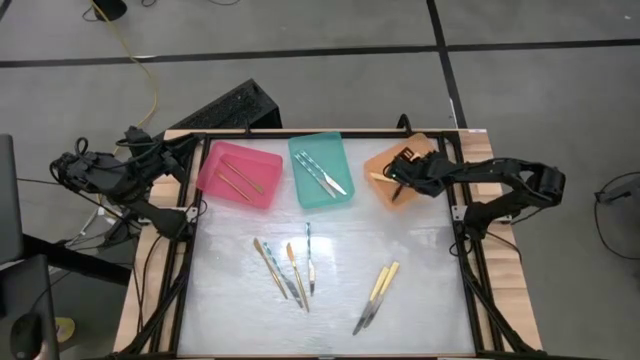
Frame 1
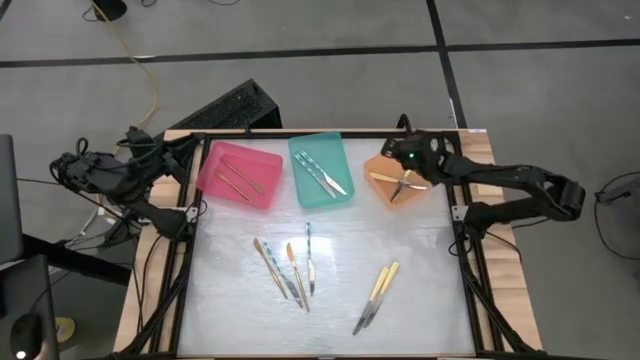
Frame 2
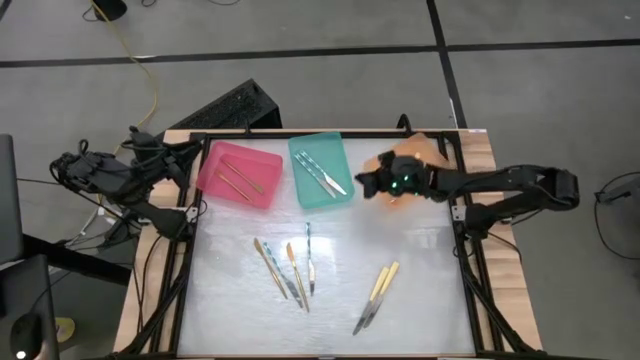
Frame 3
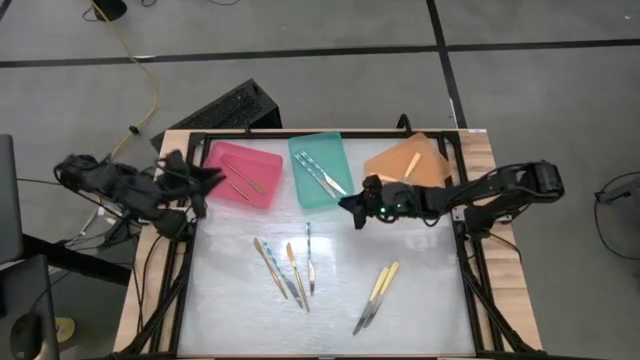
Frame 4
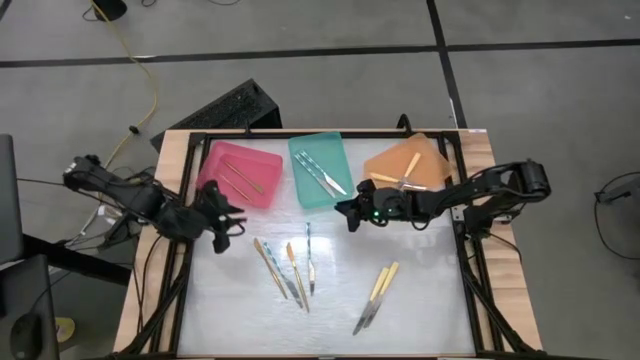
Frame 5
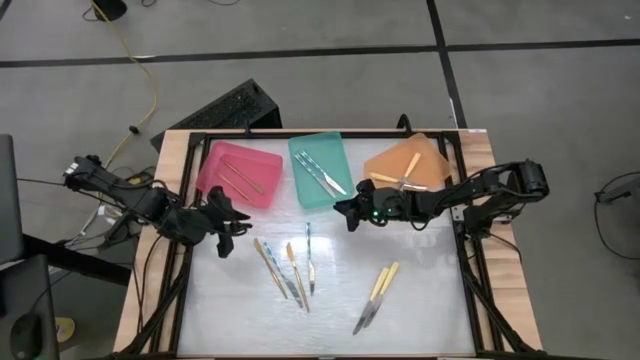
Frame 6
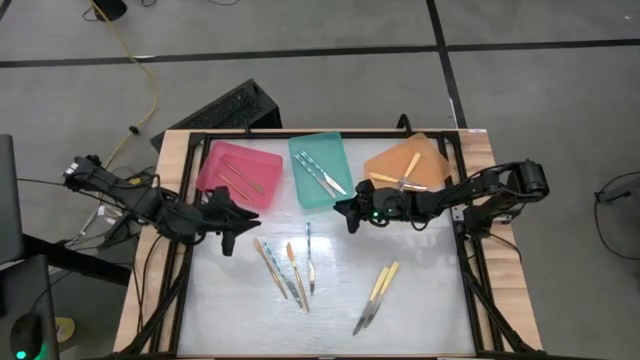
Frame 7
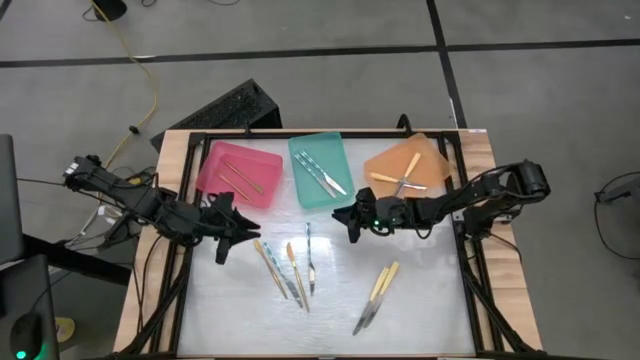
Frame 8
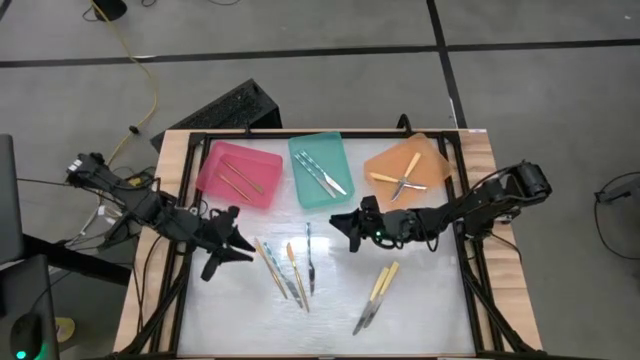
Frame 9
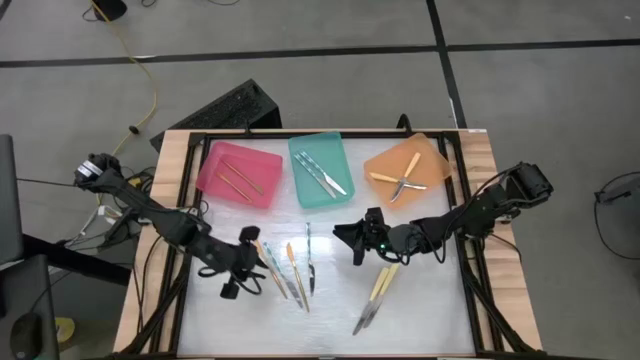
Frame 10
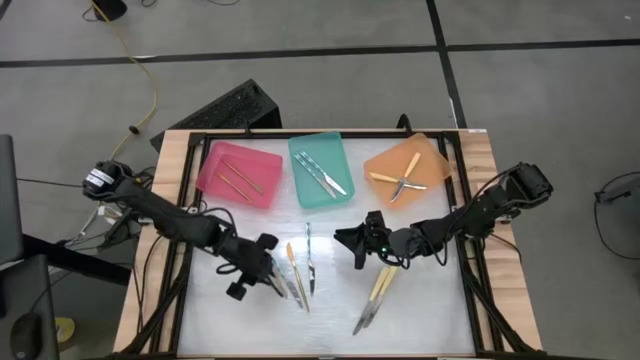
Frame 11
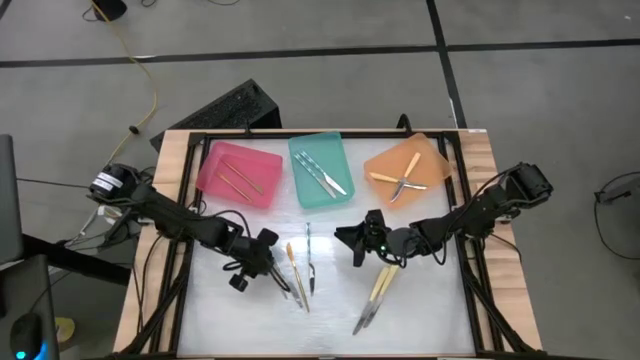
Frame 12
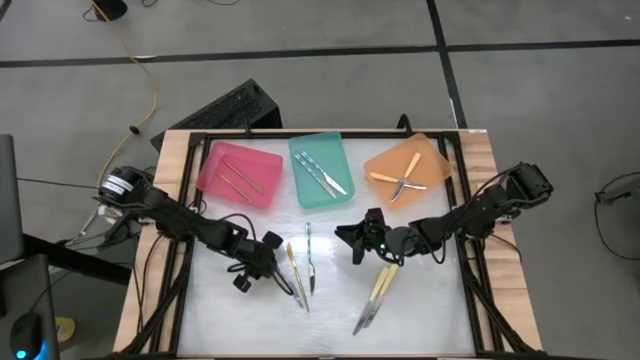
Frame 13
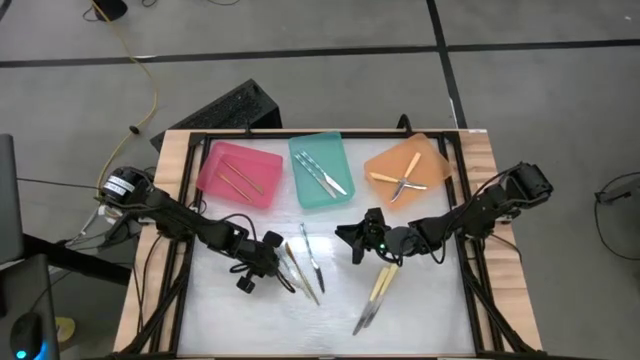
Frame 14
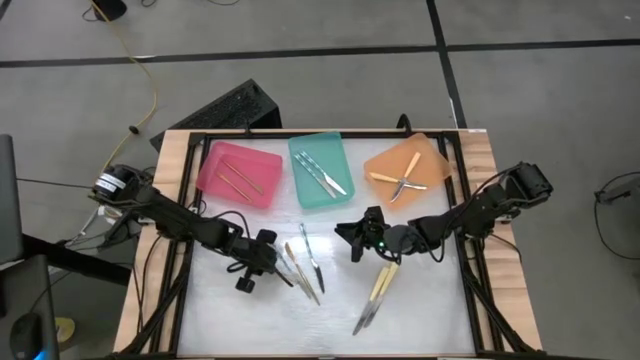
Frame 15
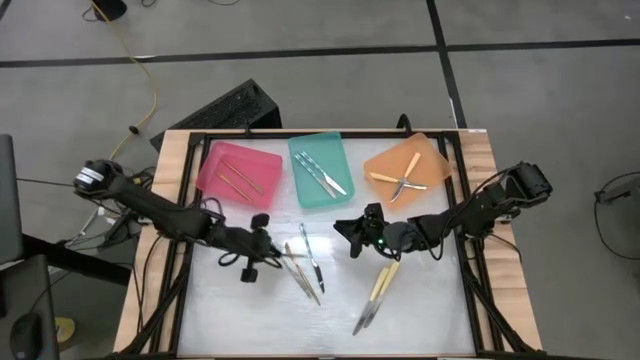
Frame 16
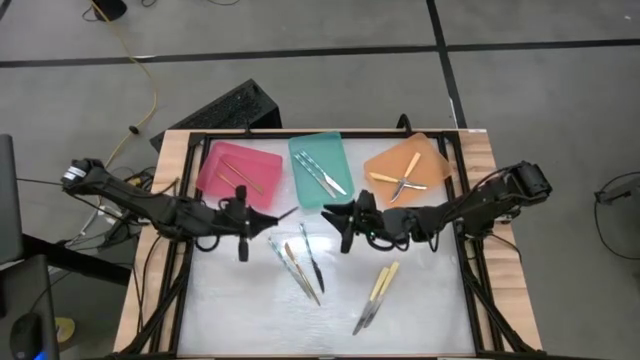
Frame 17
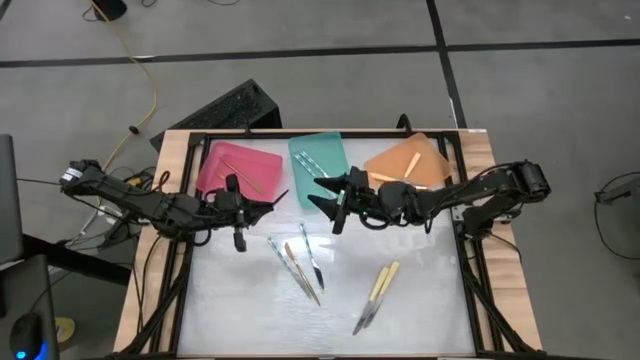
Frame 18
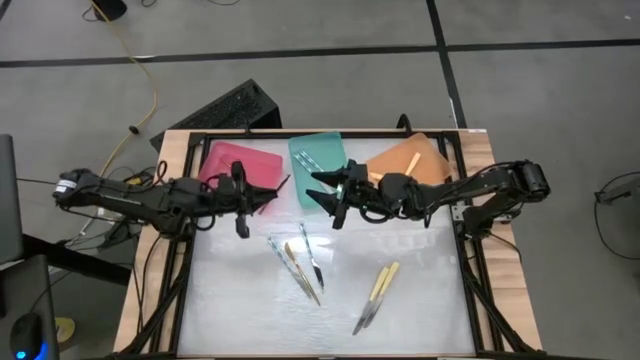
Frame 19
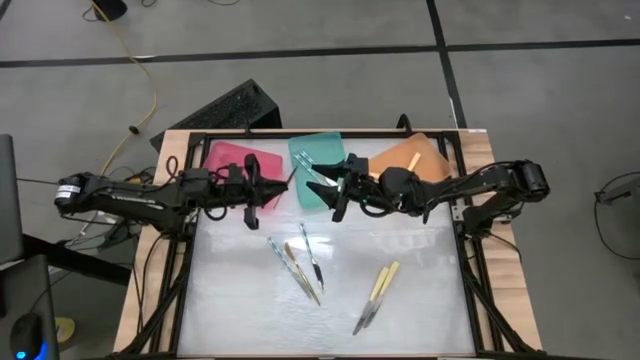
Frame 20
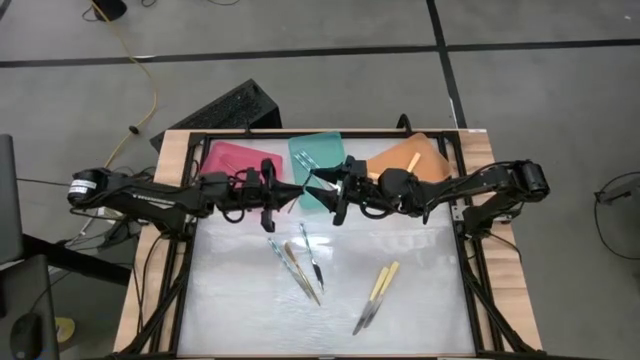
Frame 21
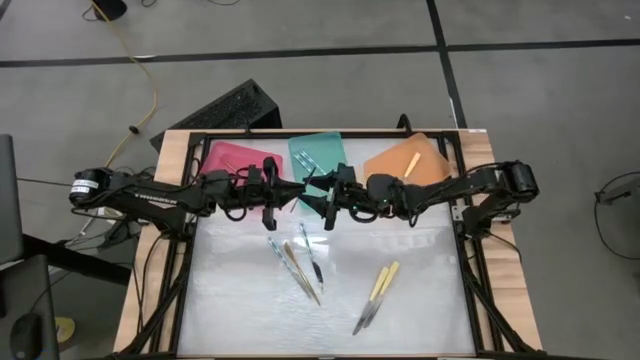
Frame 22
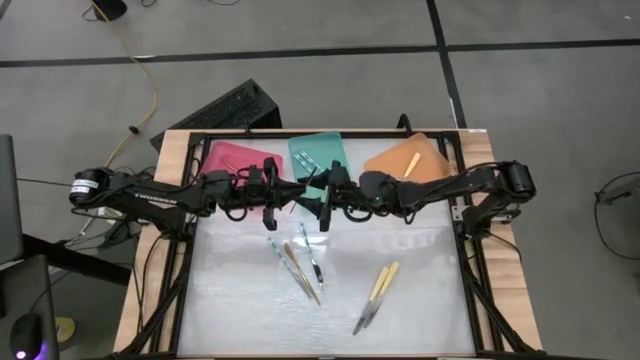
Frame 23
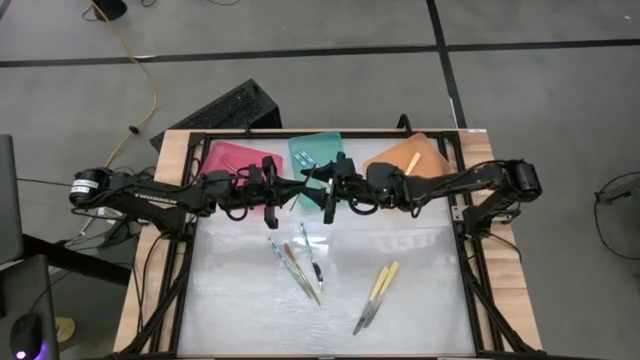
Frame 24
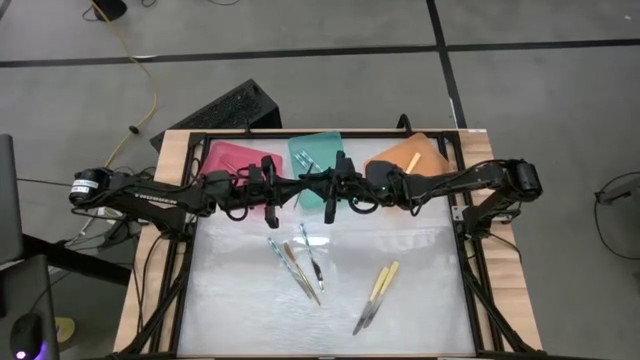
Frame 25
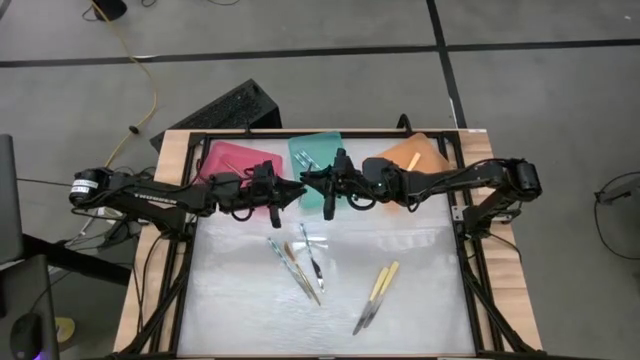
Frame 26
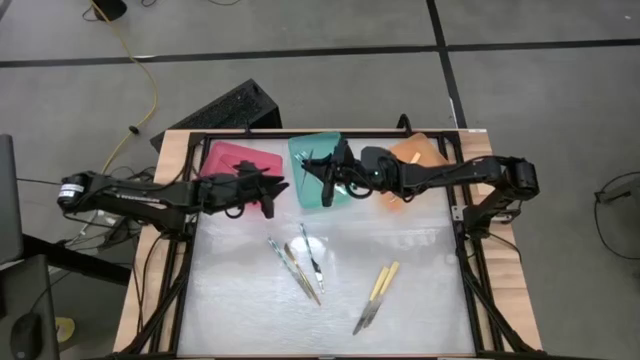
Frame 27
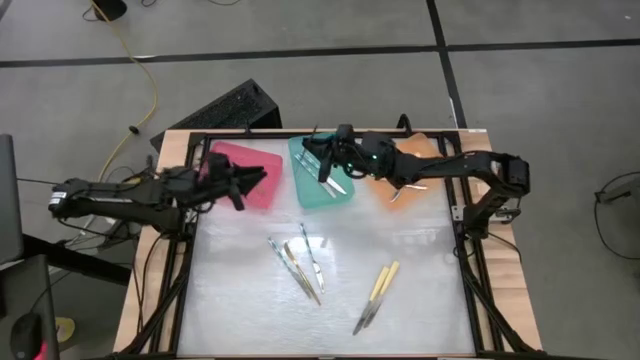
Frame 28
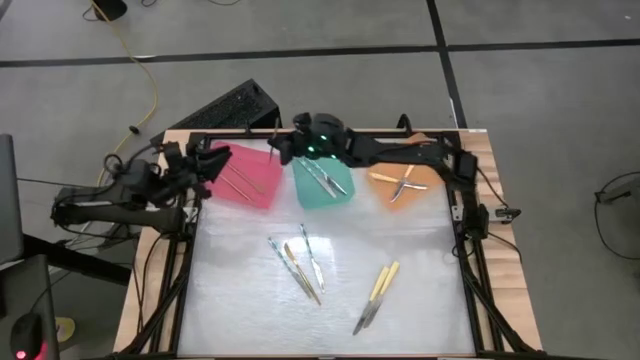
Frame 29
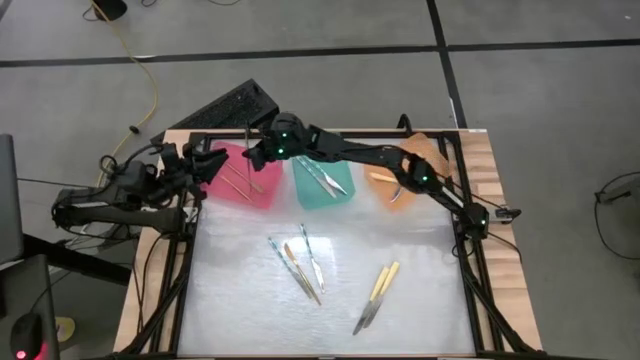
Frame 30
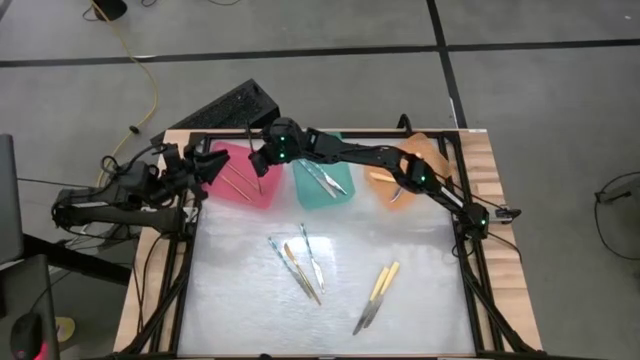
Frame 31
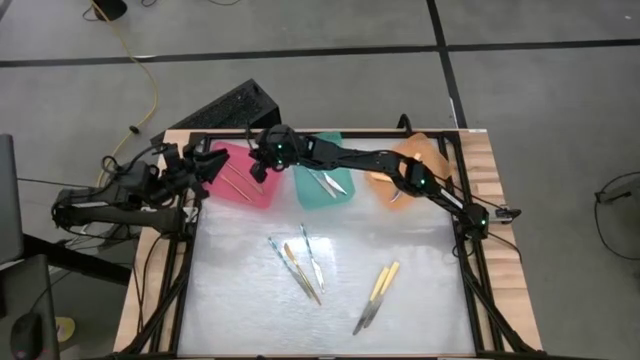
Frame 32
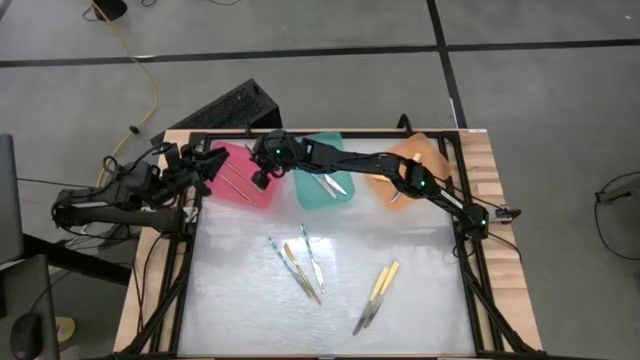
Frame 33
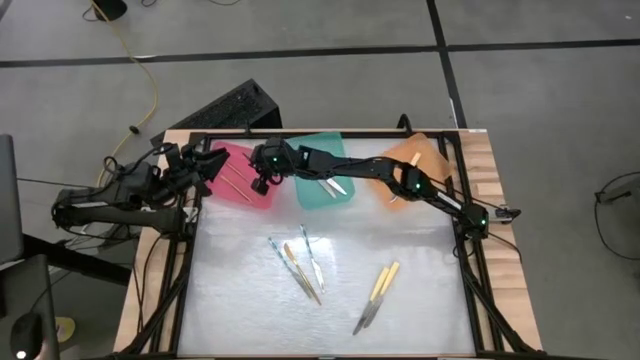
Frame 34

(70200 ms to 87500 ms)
Task: Sort silverware by color (type)
Put the gold knife into the red bin

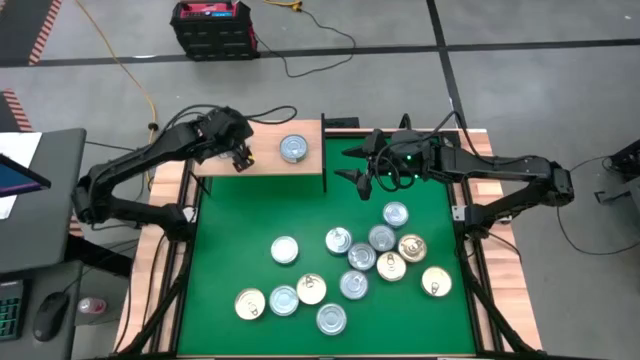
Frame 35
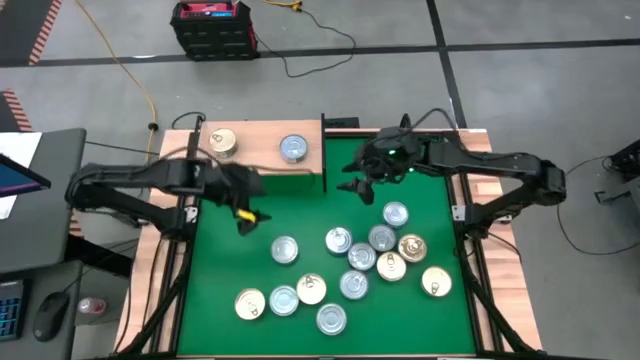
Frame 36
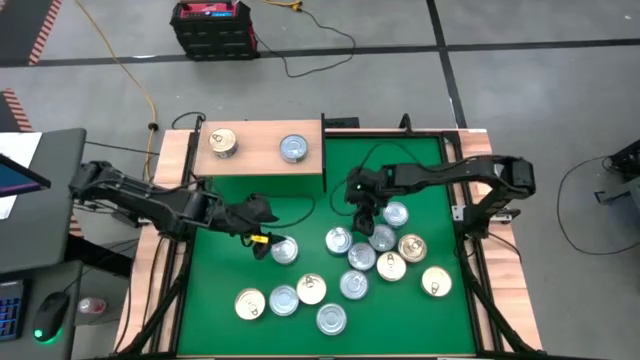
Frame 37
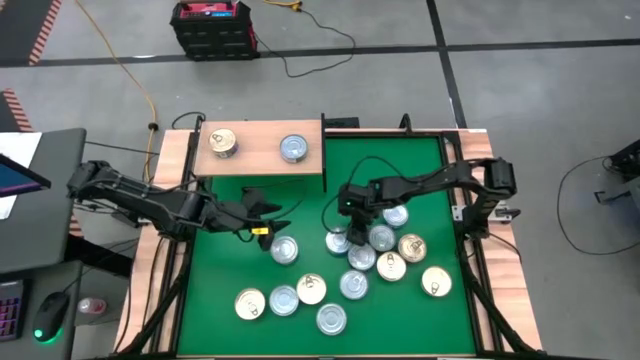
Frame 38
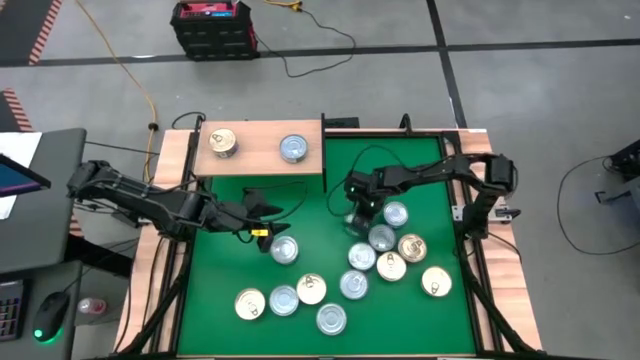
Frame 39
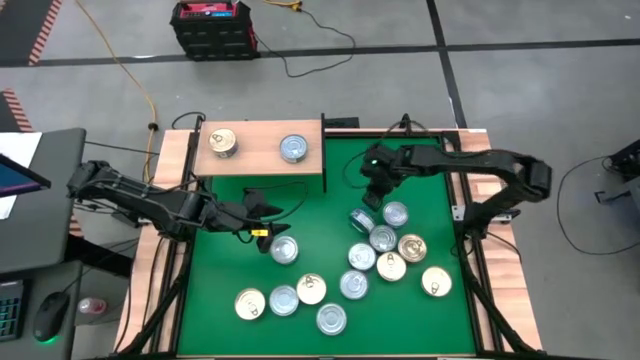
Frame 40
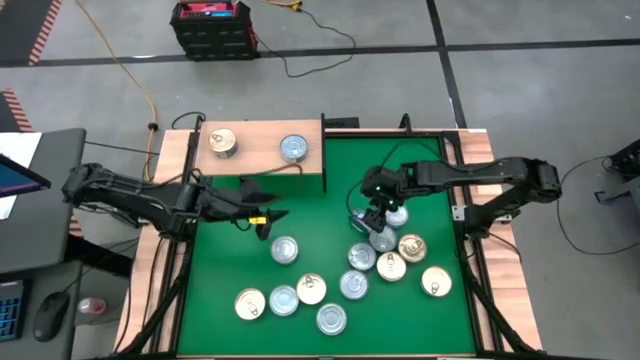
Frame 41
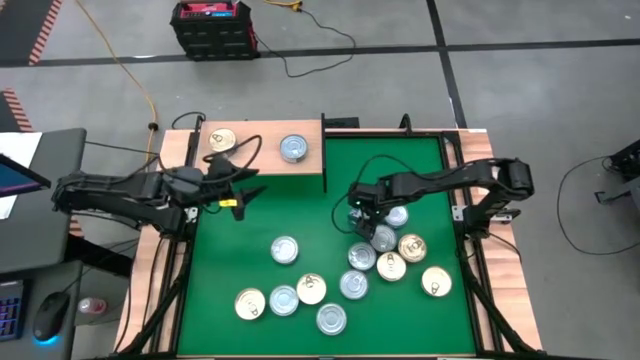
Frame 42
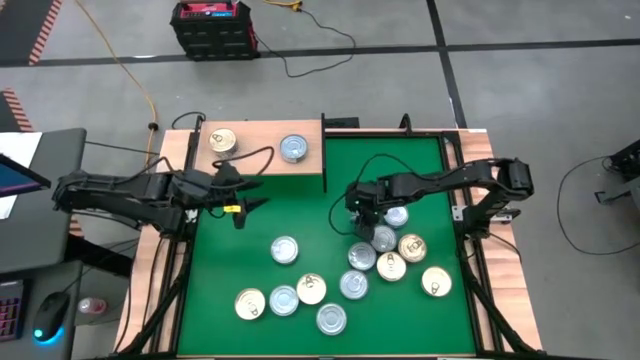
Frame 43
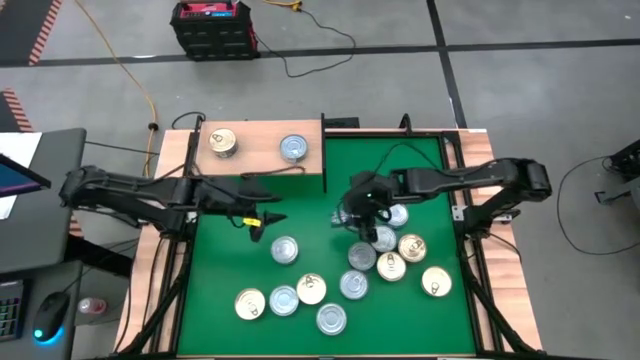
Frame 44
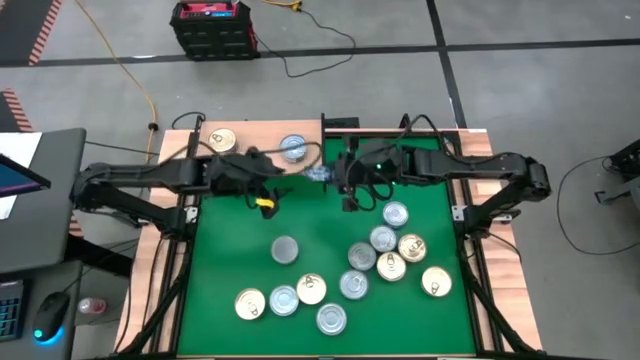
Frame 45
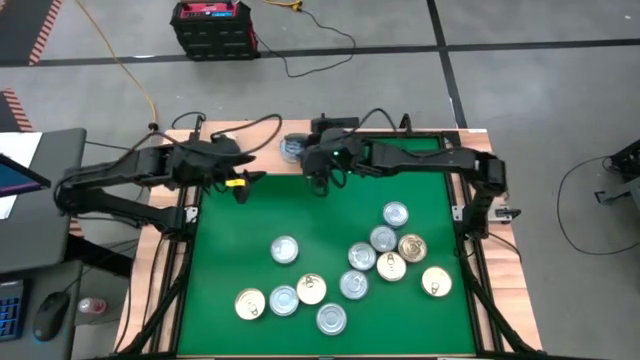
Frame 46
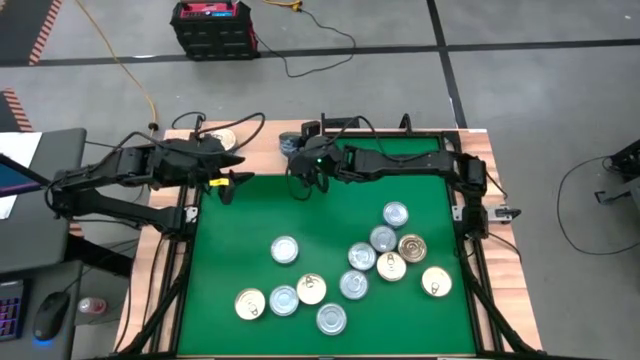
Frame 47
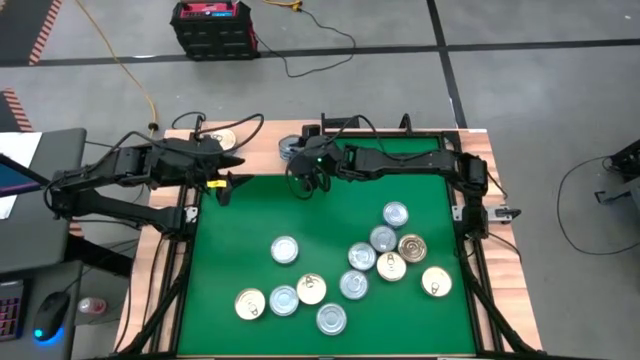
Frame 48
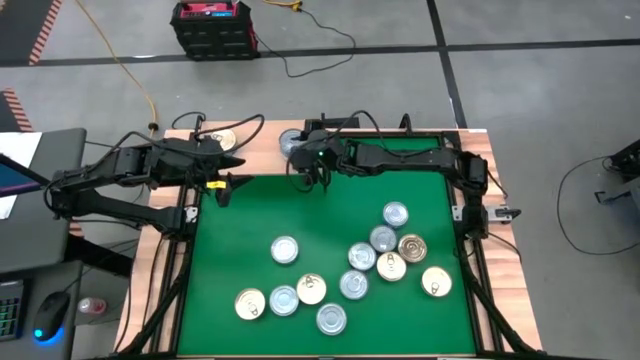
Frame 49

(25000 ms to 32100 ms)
Task: Stack canned seafood by type on shelf
Stack the dark blue tuna can on top of the green tuna can on the shelf
